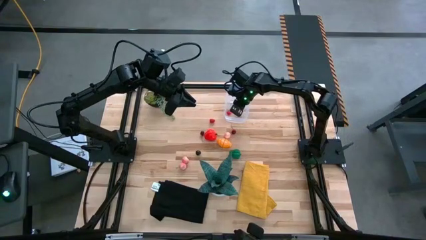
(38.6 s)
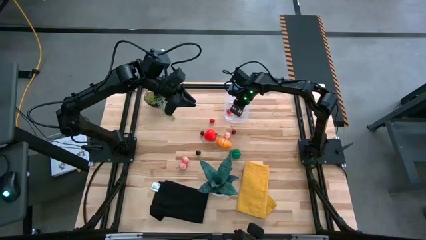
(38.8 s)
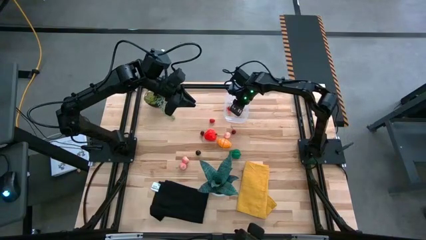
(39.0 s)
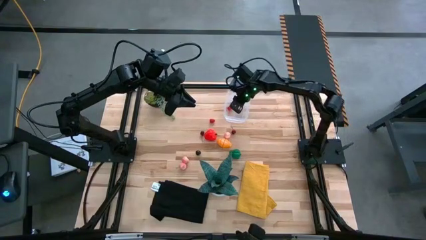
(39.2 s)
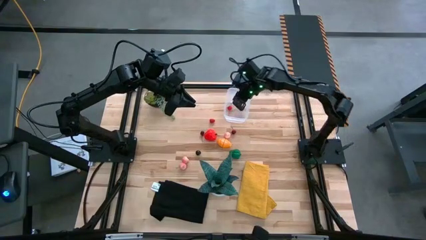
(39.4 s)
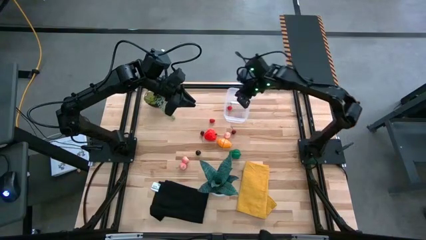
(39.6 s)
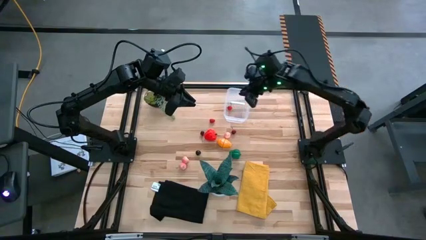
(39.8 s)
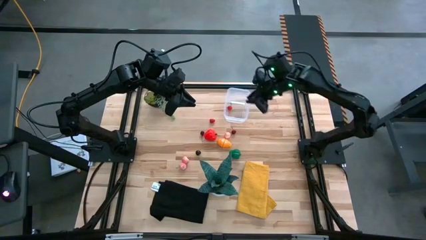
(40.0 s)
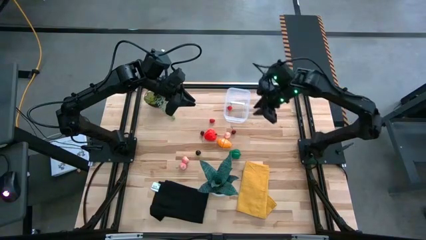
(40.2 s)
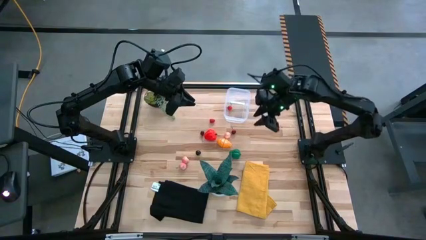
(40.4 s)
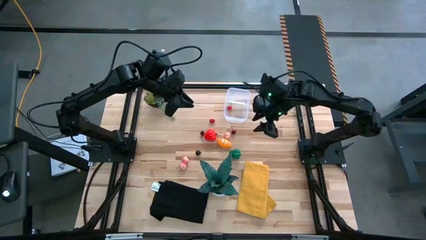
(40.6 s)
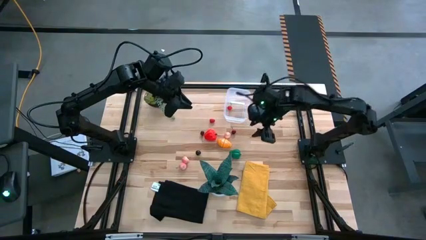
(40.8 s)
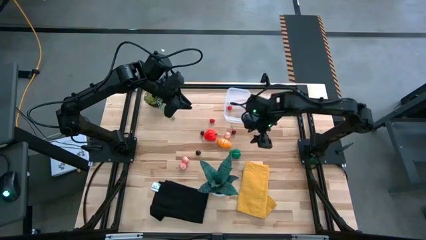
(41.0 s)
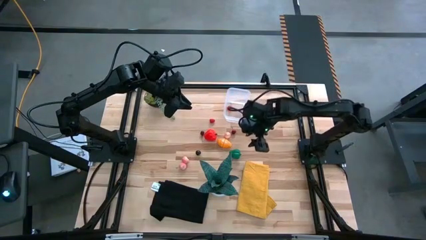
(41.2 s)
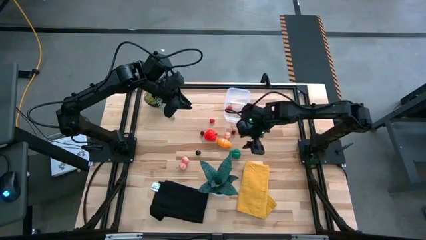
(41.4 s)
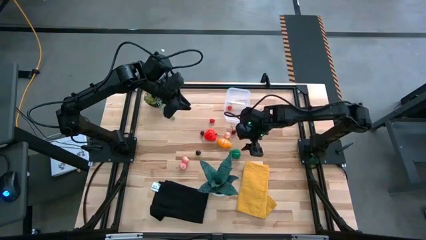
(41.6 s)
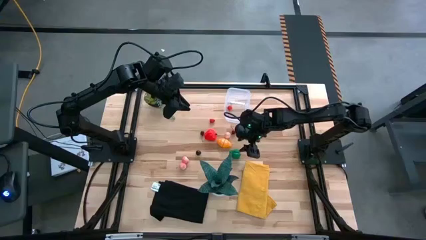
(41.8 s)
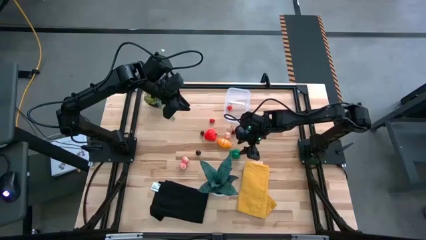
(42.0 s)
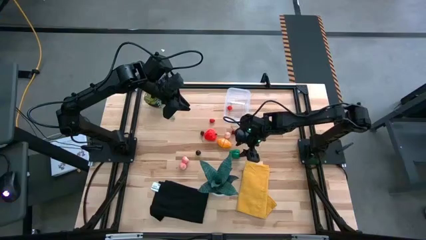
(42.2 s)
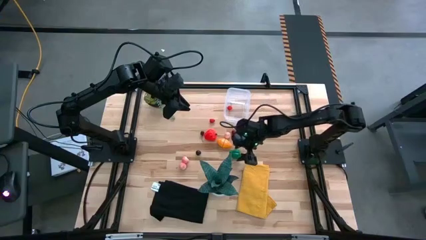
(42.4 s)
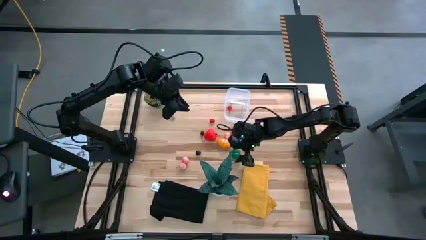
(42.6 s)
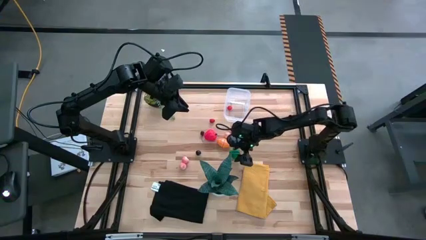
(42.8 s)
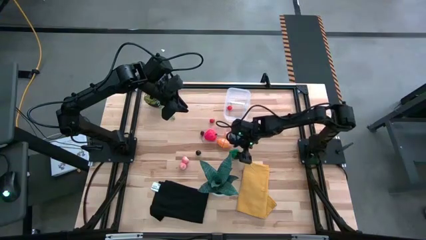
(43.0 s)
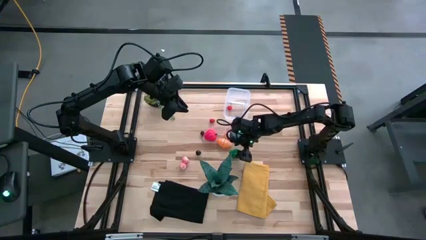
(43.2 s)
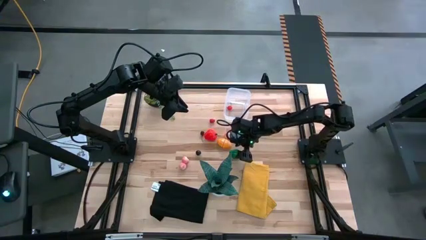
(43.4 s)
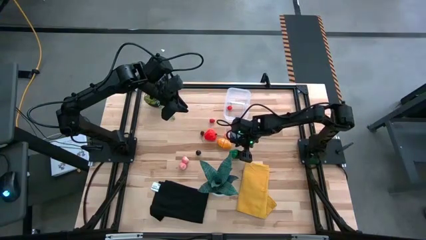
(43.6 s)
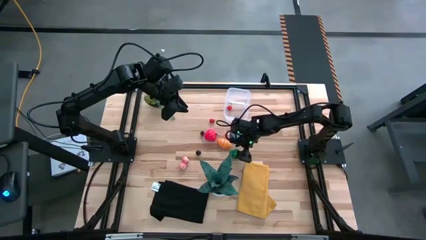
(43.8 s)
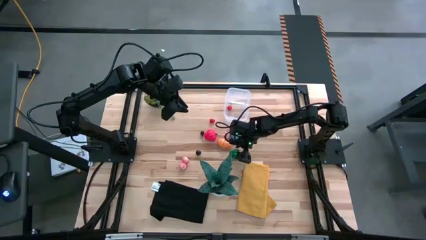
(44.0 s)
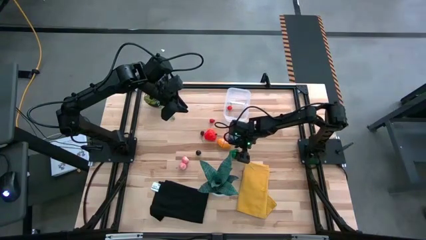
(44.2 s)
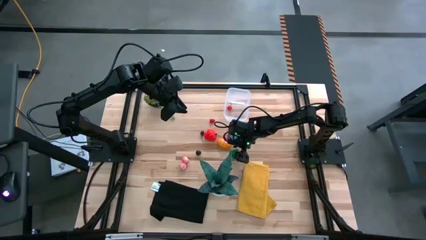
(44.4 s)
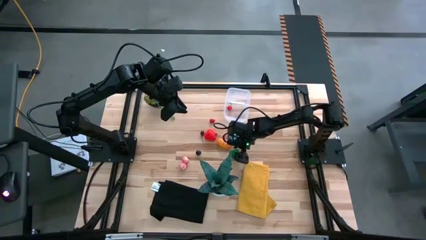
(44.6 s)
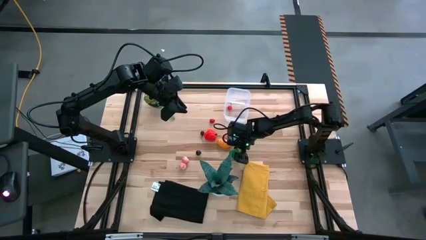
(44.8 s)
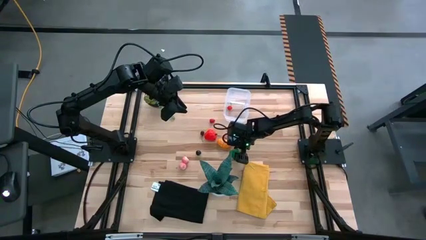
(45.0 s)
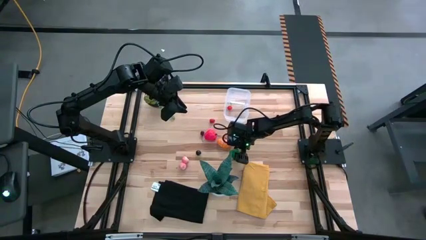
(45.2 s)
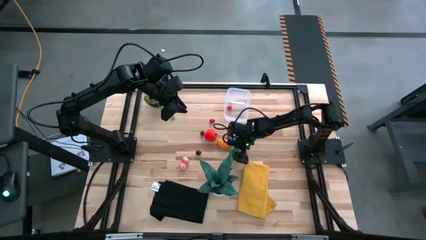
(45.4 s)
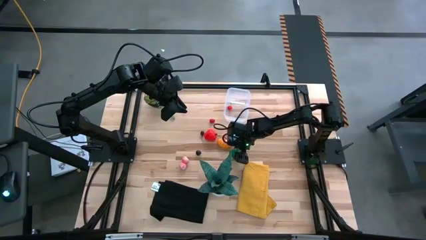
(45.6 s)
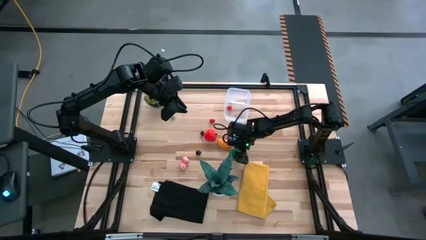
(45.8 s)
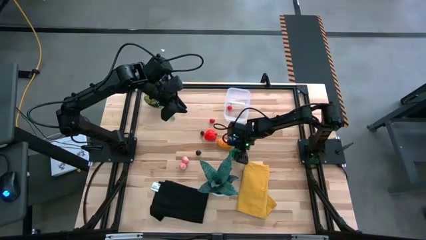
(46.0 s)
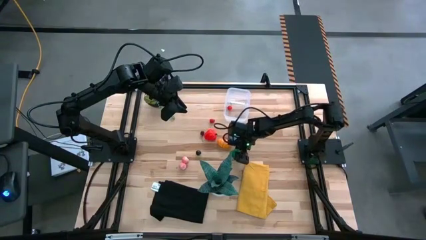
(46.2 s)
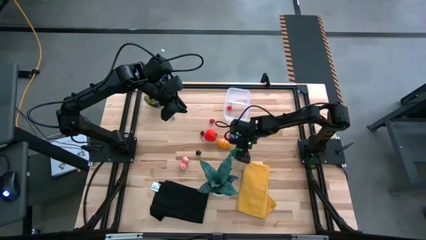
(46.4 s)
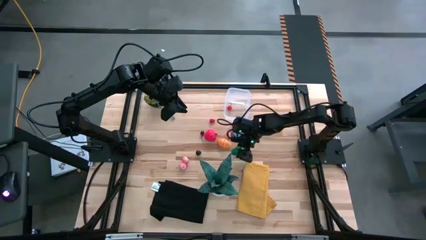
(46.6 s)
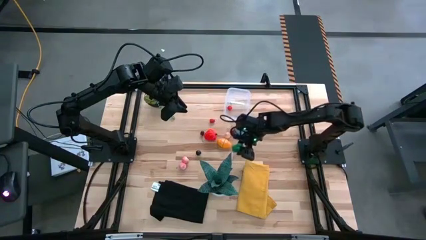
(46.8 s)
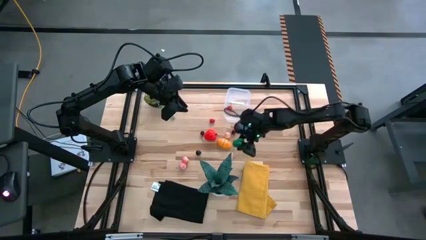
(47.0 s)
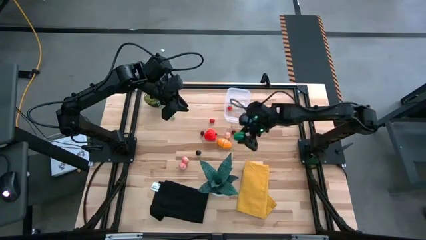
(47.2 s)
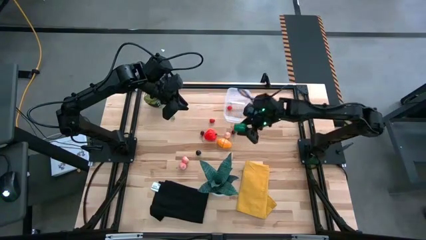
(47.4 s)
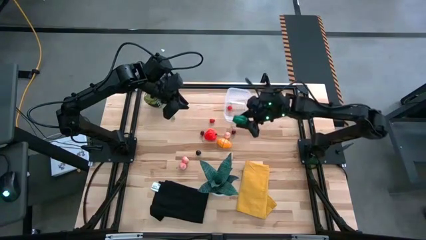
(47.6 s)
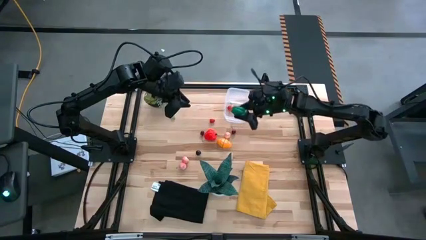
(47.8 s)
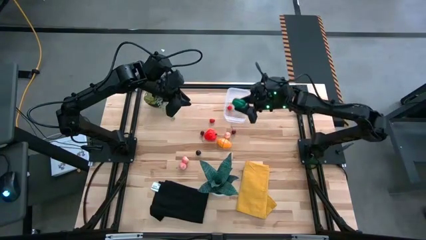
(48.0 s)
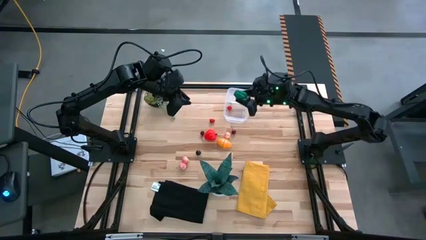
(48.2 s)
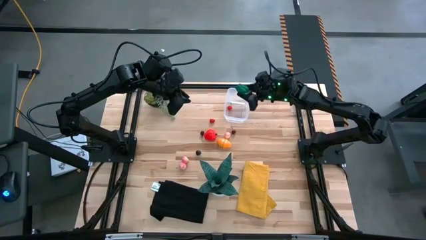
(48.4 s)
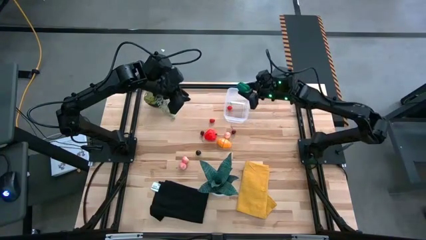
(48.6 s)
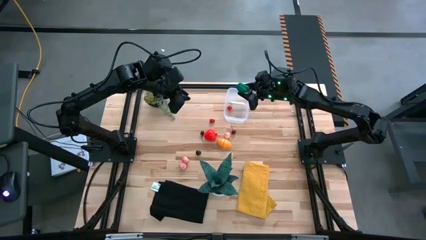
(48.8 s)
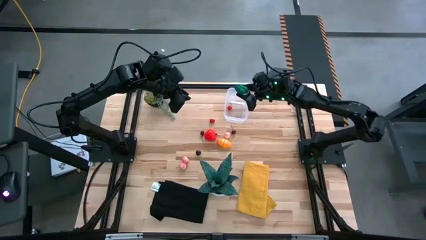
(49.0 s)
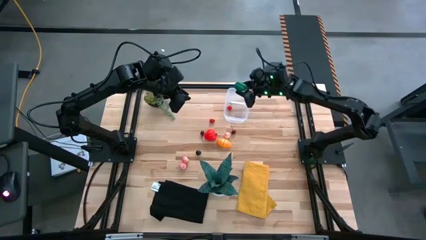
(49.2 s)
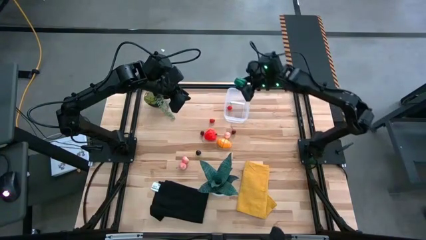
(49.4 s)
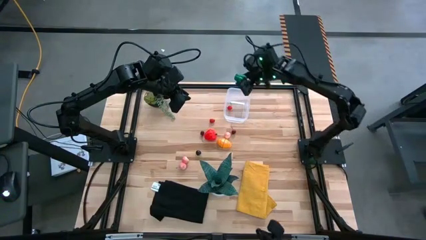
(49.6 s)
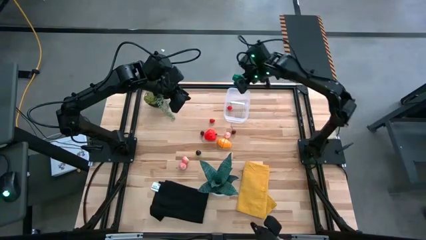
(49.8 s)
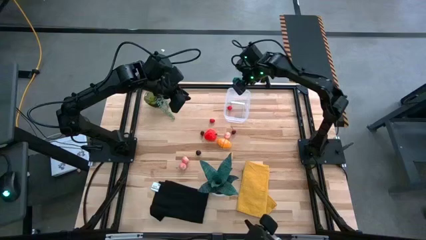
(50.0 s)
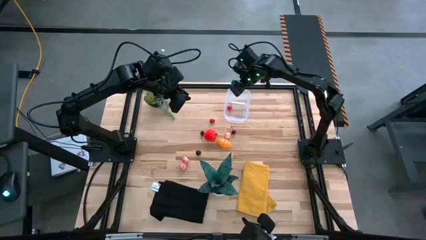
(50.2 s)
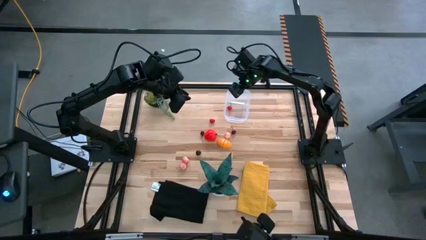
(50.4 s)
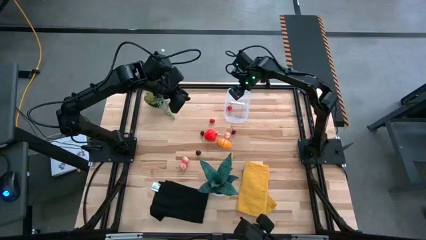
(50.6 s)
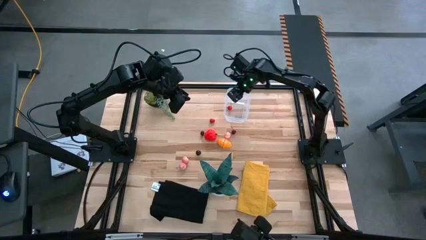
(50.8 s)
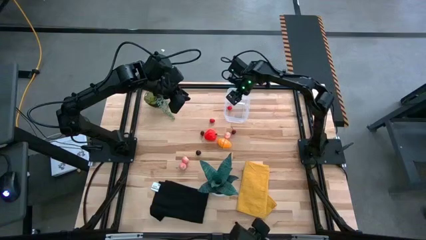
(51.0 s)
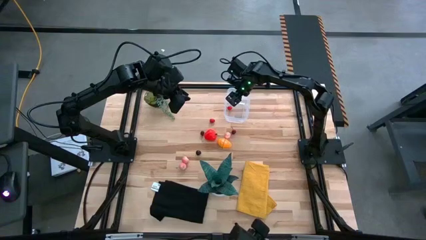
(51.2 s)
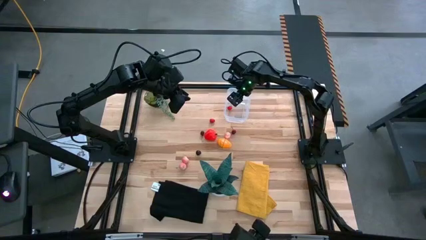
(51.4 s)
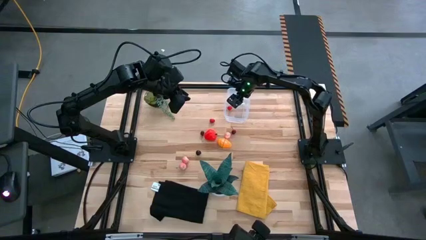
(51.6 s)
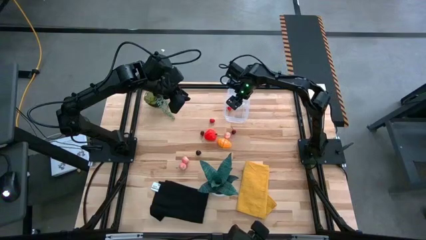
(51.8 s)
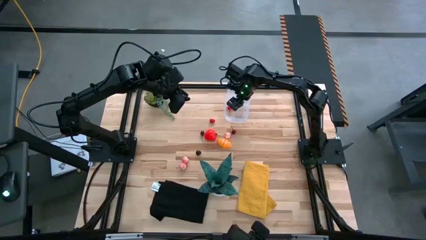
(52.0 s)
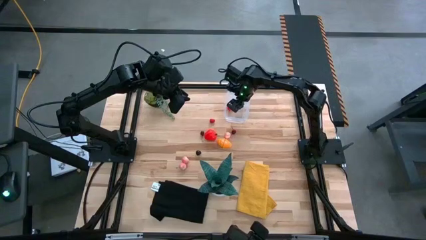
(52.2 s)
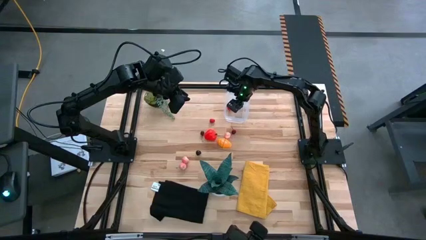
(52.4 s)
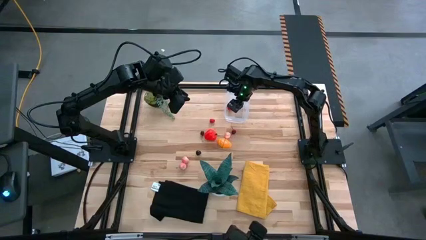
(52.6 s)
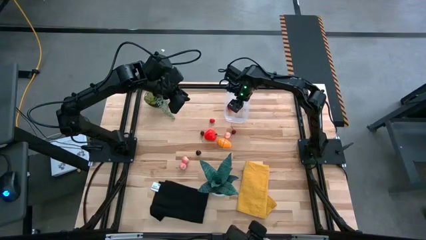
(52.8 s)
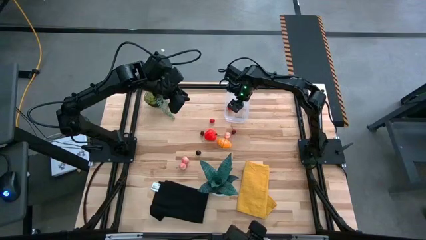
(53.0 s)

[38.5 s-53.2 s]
Task: Pick and placing Produce into tupperware
Put the bell pepper into the transparent container

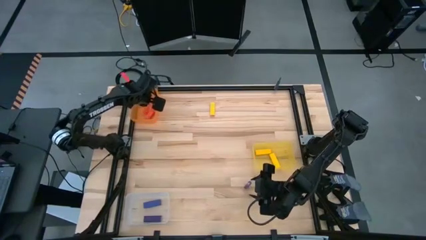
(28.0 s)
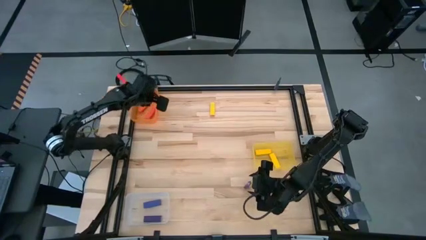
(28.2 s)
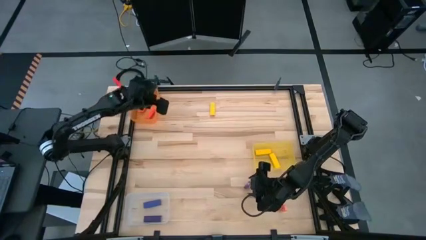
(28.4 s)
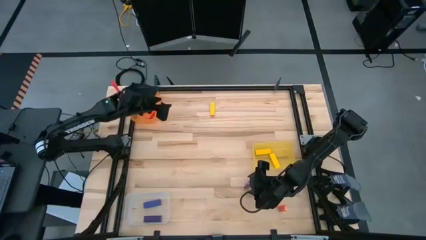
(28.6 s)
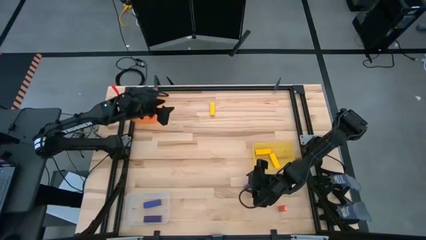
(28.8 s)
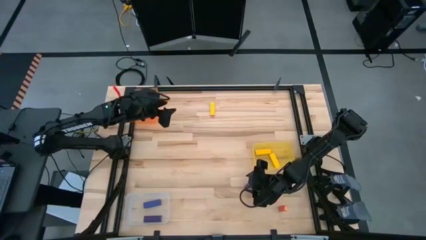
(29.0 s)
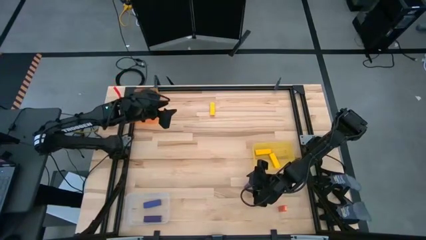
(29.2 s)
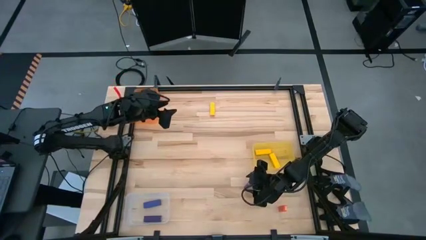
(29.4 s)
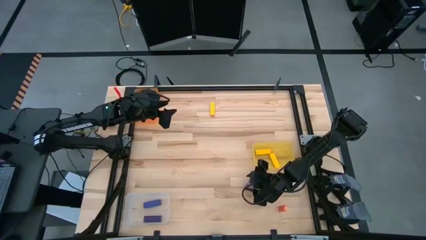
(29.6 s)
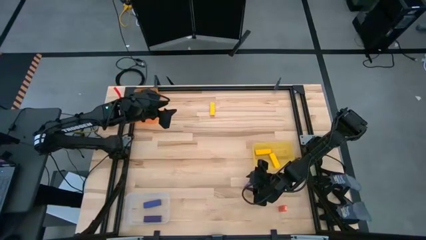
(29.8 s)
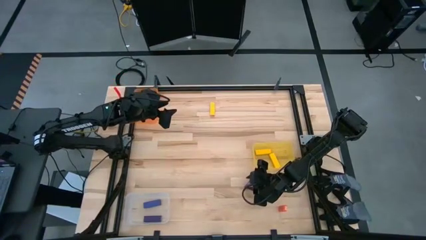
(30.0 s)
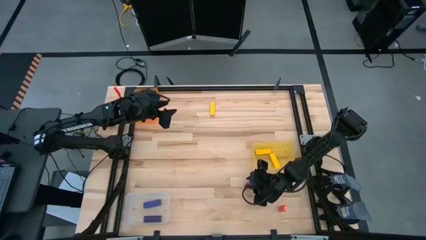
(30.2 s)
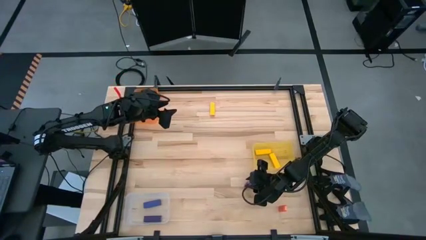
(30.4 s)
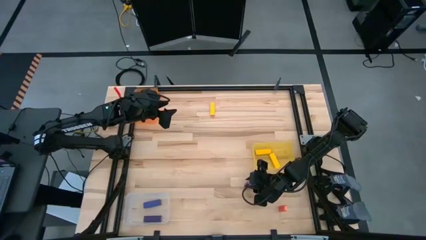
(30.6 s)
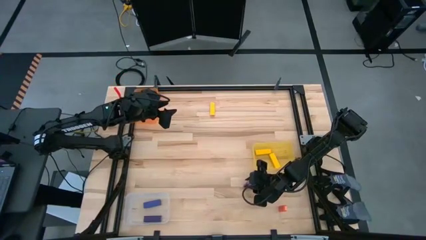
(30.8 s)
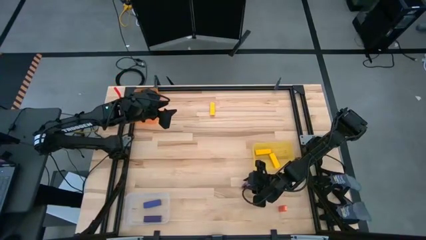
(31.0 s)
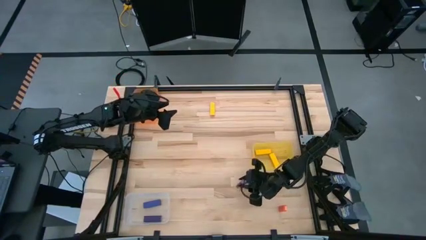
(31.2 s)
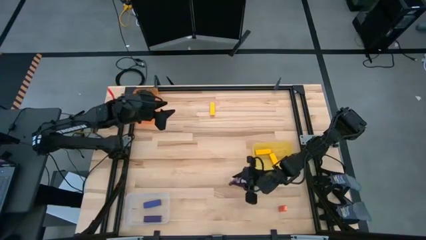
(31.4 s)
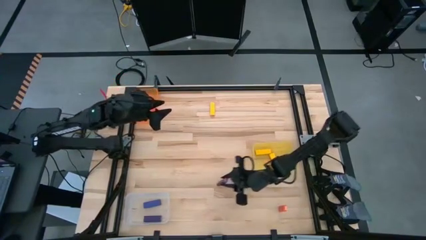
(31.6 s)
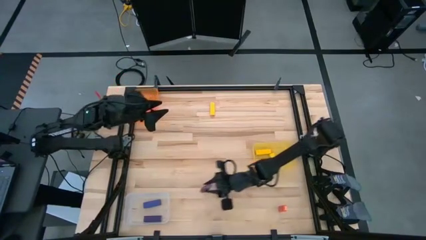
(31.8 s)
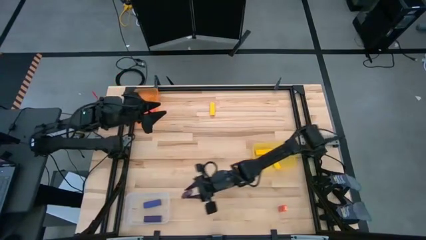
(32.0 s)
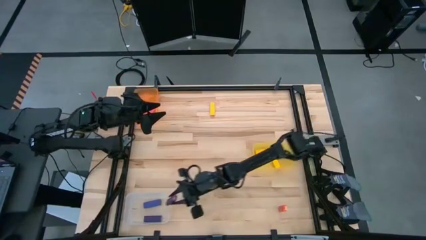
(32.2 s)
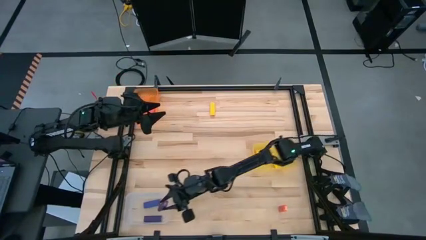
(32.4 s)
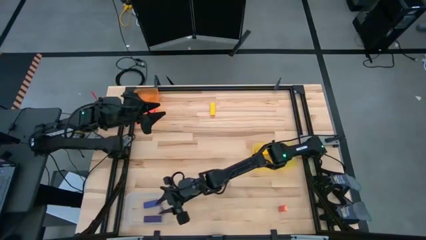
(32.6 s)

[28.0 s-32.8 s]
Task: Sort blocks
Put the purple block into the transparent bin
